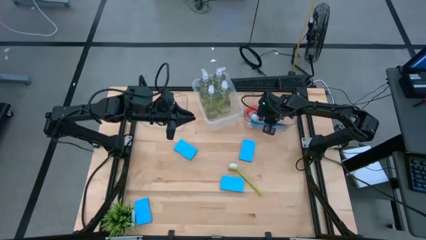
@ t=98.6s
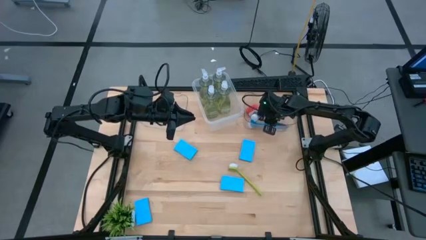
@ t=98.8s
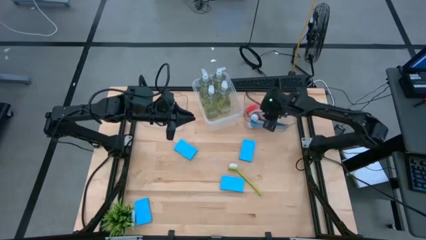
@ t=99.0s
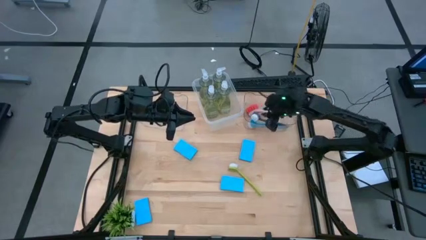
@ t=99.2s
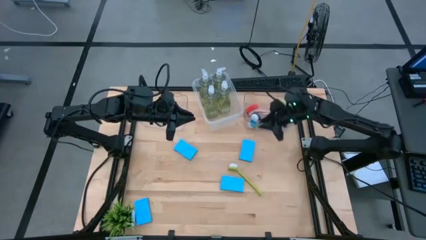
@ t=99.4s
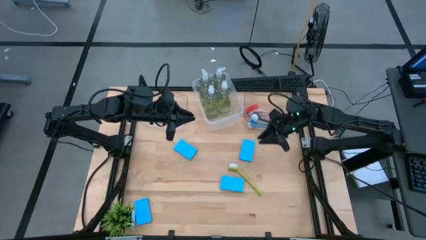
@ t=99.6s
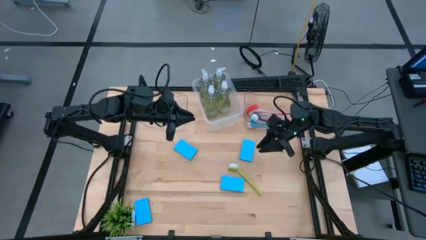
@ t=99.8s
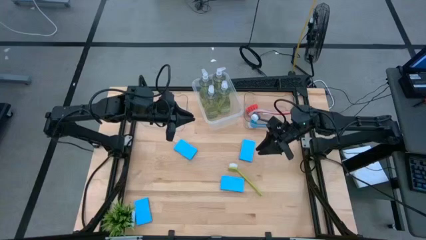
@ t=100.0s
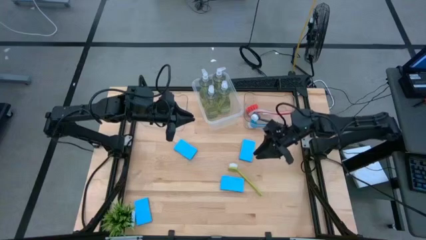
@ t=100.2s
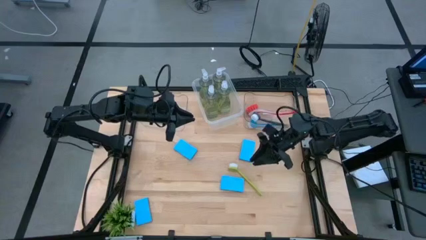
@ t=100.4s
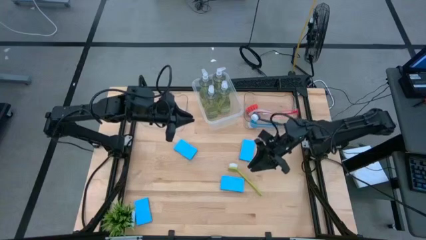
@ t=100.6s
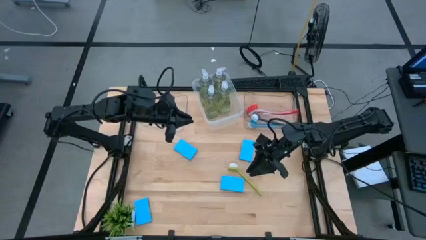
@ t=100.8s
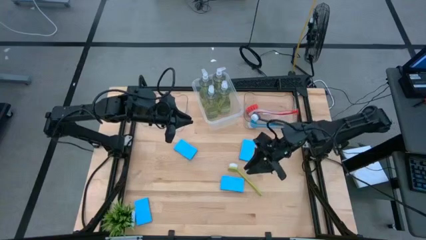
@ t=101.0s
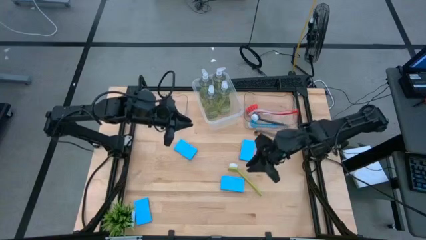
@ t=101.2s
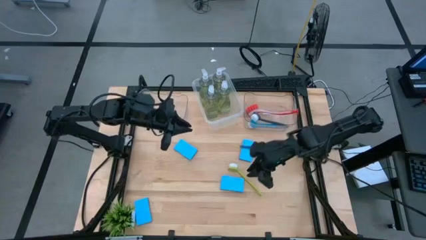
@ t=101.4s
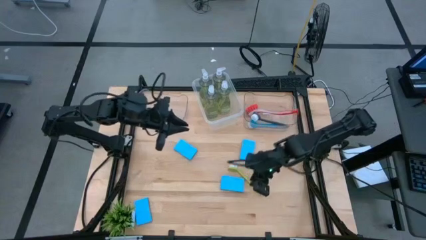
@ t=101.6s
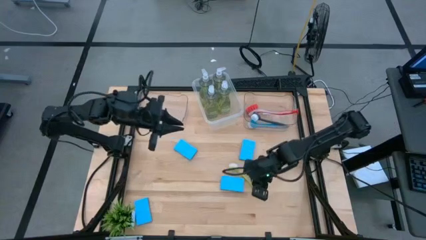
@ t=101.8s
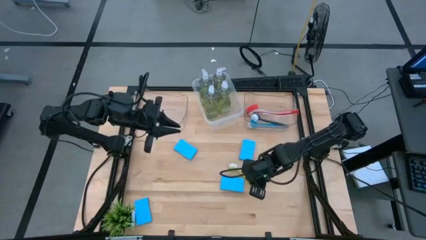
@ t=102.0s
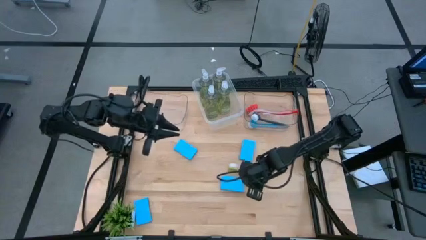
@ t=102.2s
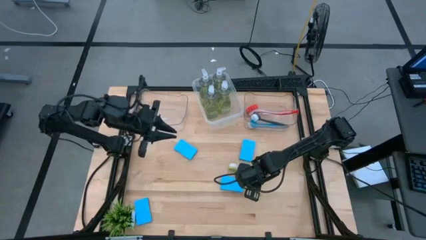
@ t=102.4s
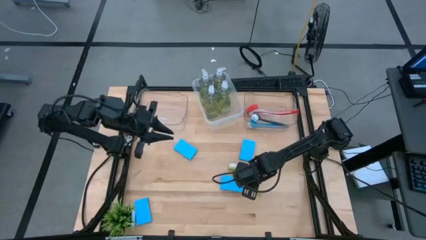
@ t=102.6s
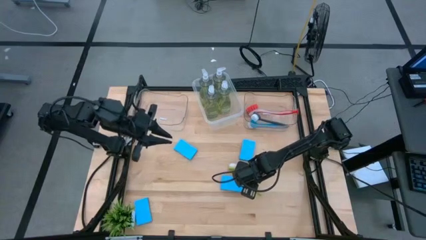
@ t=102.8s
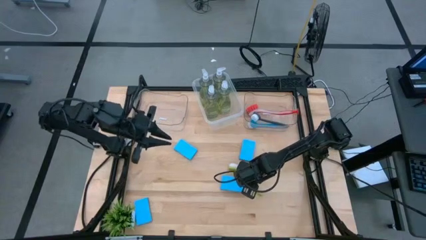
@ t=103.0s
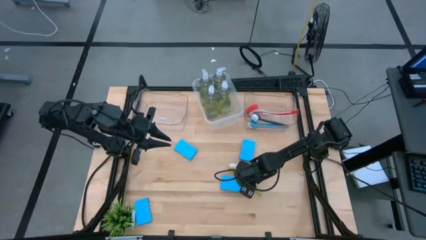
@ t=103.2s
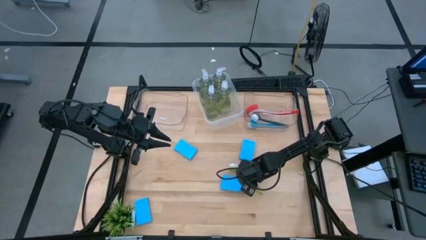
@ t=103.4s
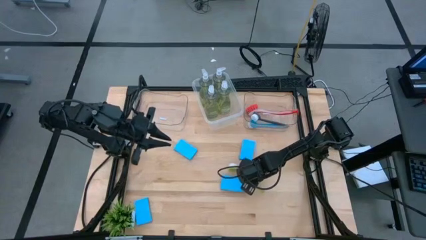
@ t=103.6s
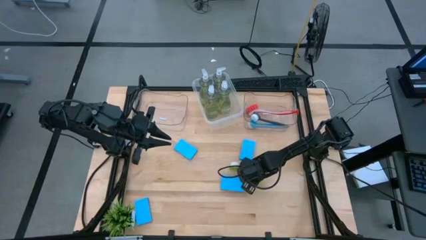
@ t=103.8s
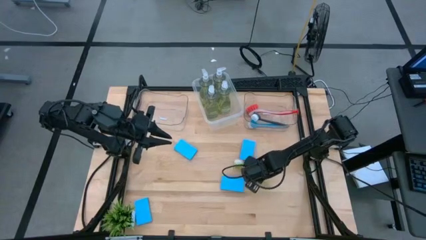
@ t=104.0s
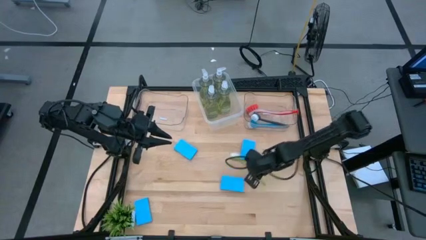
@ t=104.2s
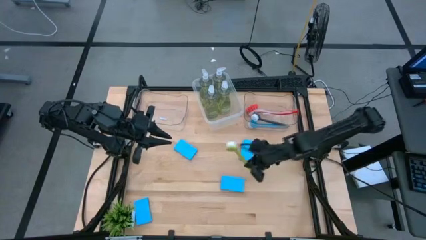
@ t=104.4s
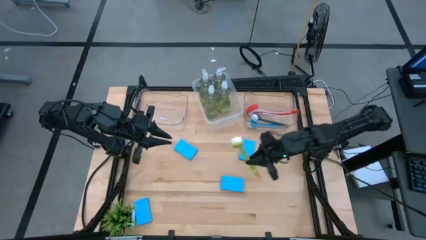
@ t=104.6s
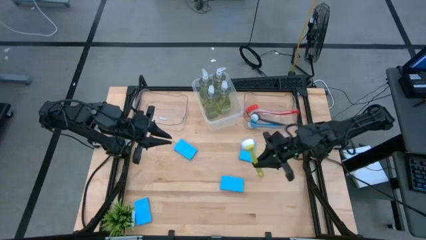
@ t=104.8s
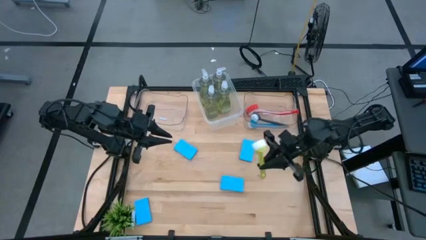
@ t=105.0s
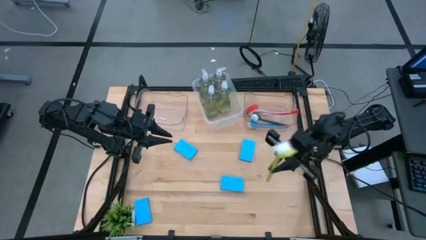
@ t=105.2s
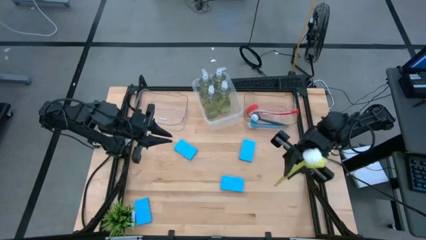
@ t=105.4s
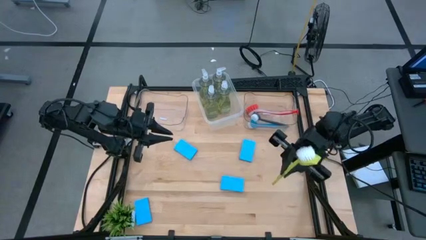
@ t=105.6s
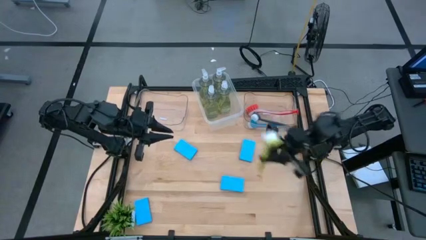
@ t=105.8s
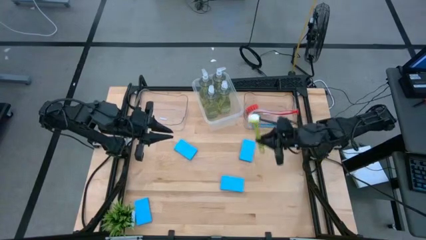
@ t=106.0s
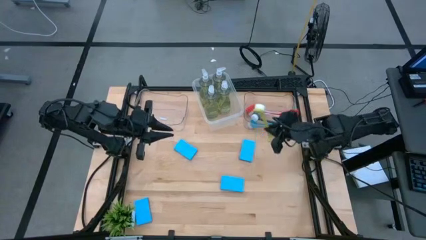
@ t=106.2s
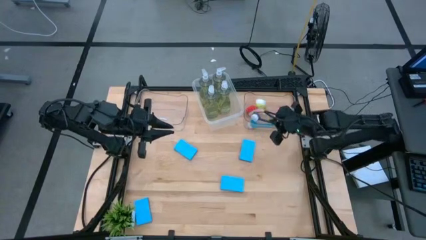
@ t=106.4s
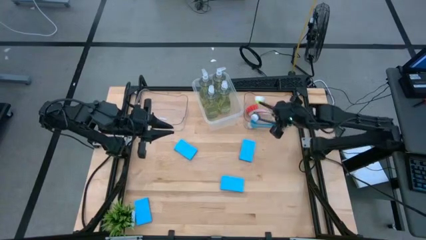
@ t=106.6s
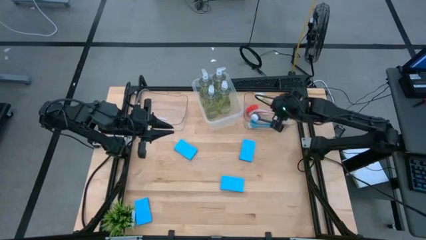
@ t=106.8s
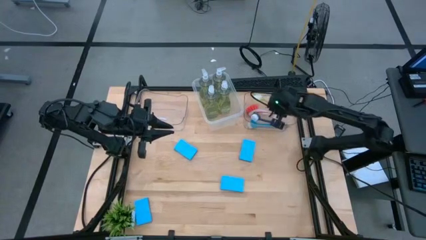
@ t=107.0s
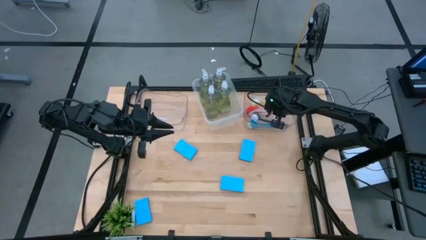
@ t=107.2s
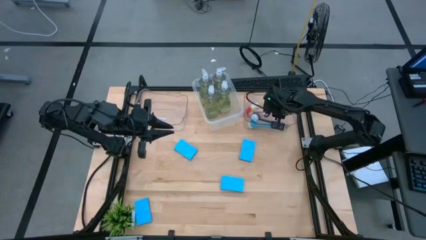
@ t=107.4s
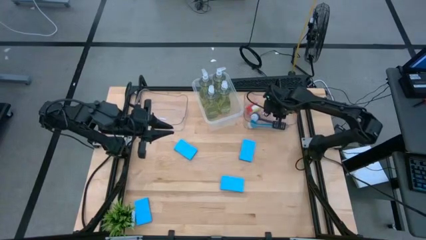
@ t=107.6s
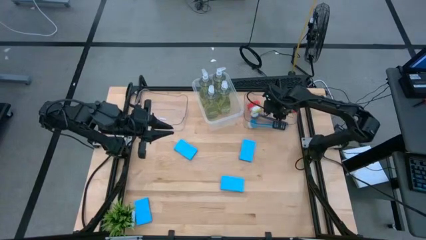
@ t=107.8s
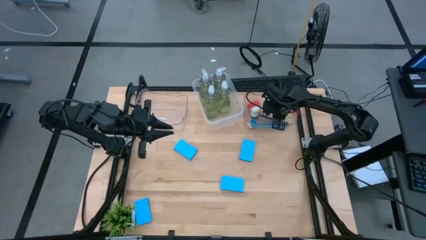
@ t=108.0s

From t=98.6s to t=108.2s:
Task: Pick & Place Kitchen Sink Supplies
Put the green dish brush into the right transparent bin

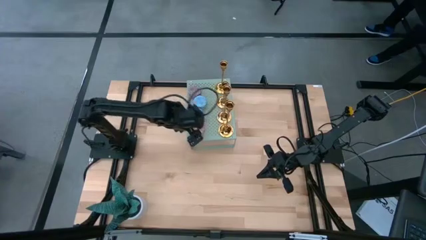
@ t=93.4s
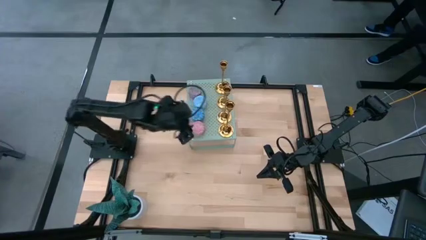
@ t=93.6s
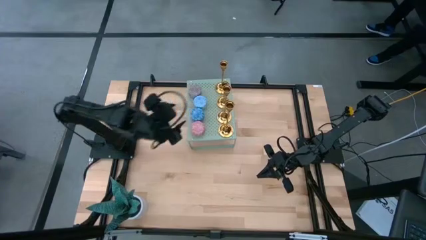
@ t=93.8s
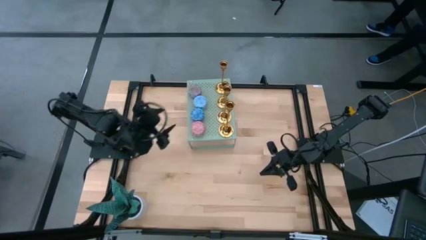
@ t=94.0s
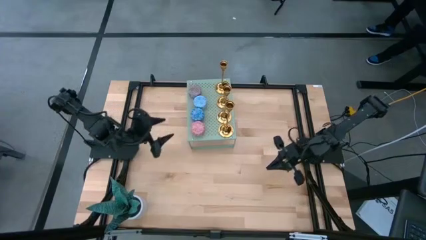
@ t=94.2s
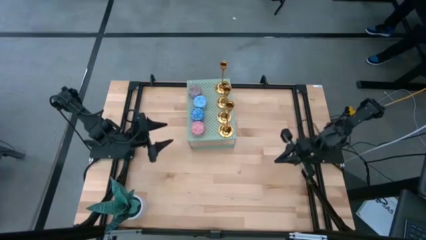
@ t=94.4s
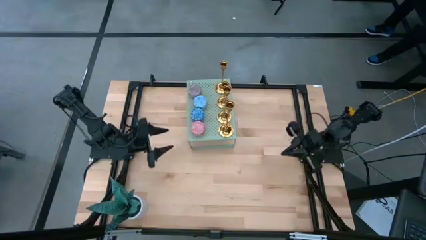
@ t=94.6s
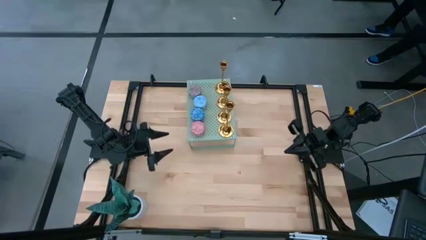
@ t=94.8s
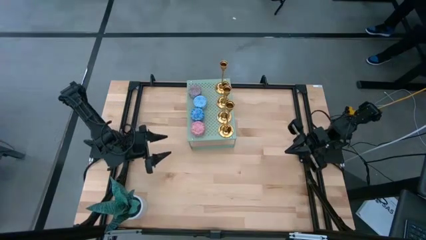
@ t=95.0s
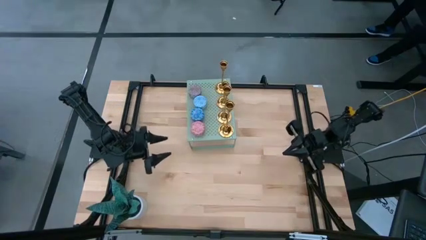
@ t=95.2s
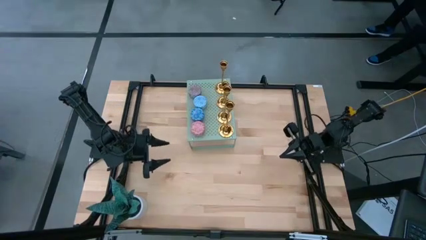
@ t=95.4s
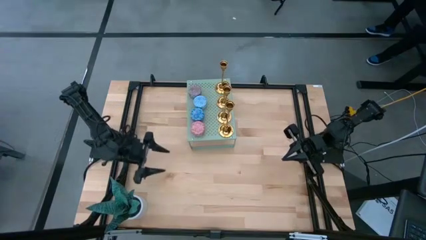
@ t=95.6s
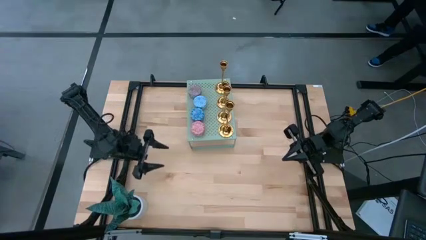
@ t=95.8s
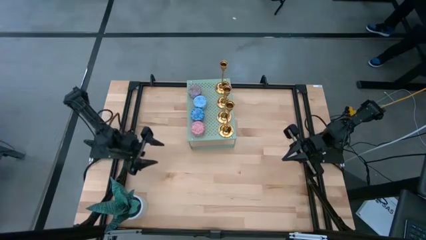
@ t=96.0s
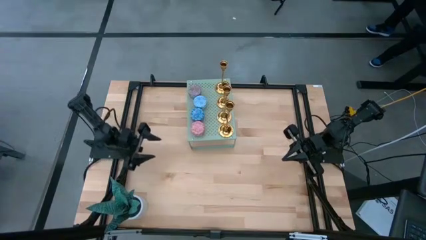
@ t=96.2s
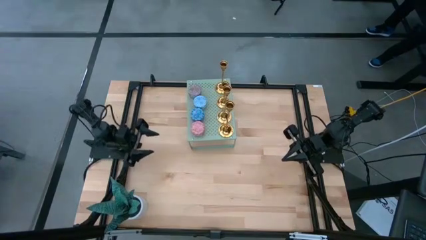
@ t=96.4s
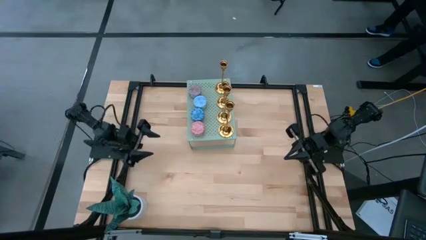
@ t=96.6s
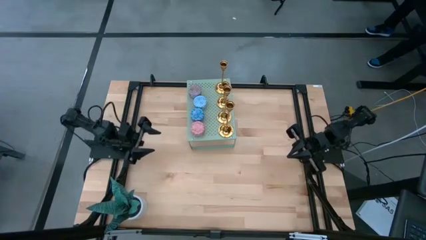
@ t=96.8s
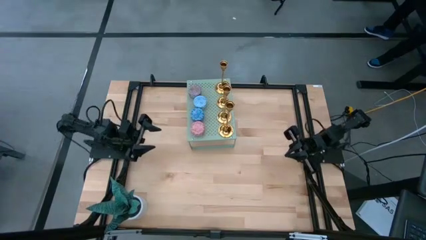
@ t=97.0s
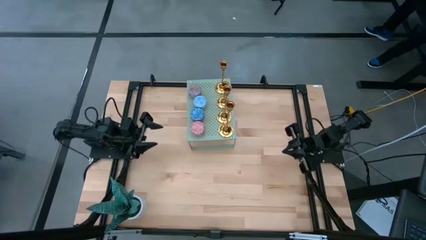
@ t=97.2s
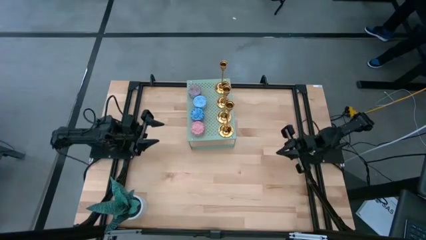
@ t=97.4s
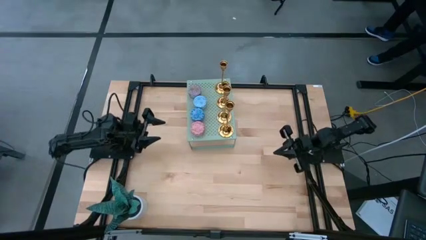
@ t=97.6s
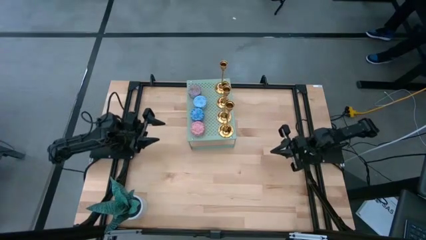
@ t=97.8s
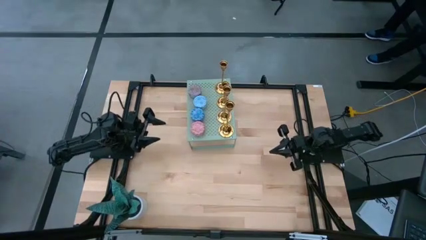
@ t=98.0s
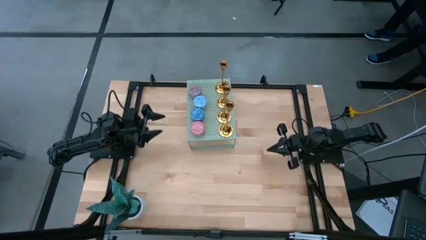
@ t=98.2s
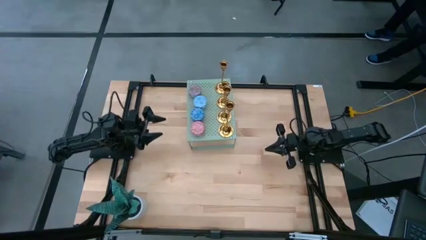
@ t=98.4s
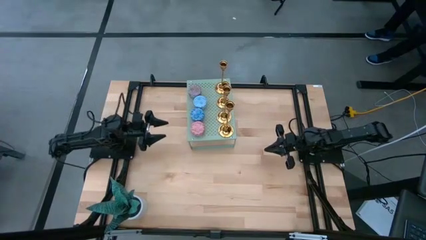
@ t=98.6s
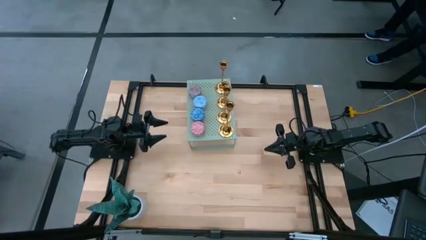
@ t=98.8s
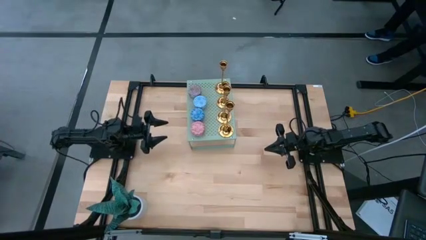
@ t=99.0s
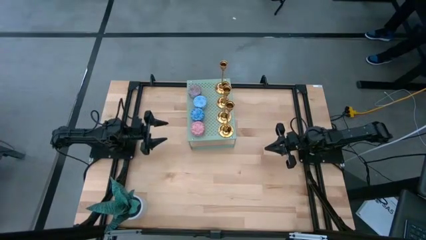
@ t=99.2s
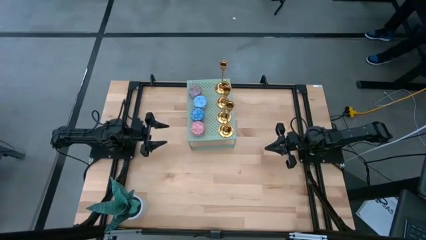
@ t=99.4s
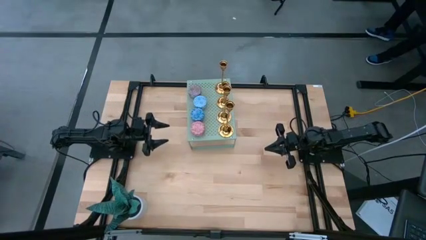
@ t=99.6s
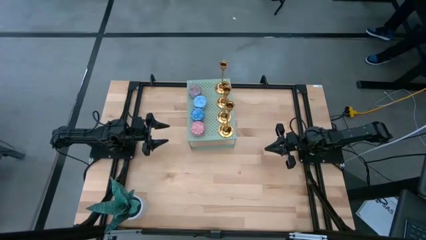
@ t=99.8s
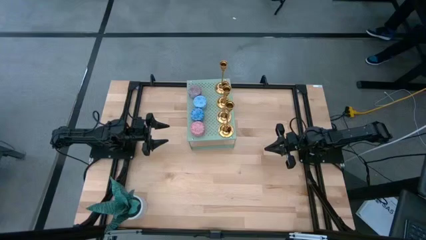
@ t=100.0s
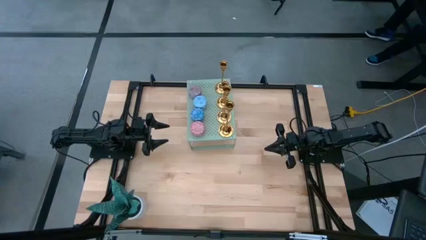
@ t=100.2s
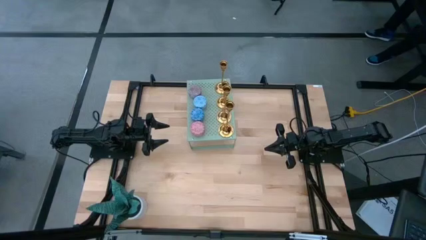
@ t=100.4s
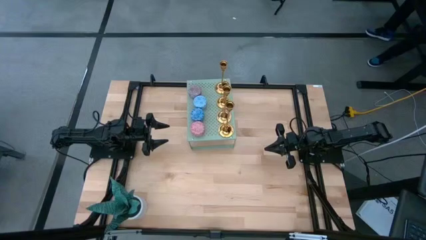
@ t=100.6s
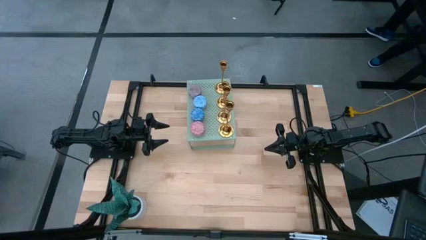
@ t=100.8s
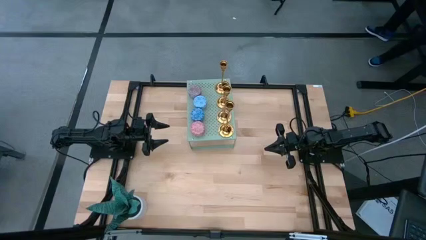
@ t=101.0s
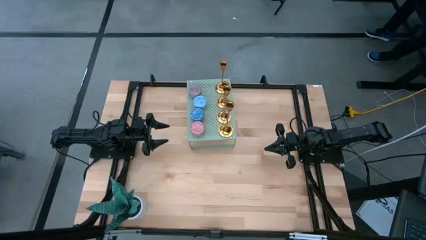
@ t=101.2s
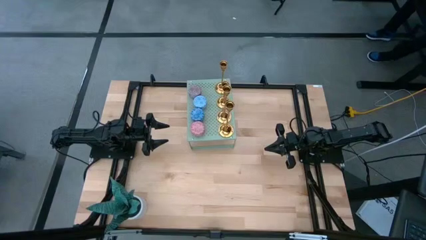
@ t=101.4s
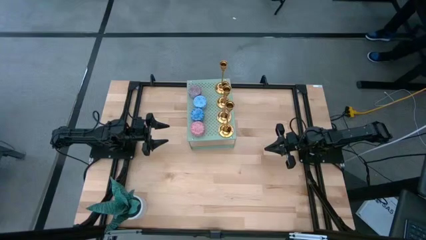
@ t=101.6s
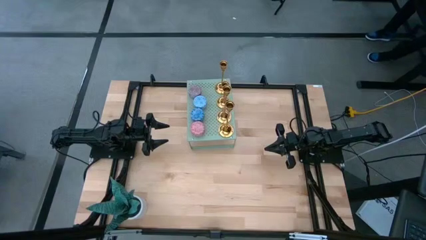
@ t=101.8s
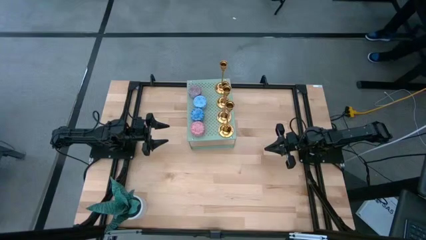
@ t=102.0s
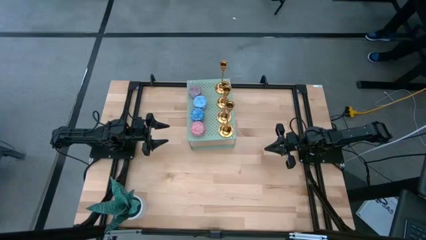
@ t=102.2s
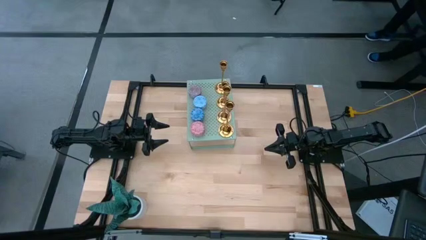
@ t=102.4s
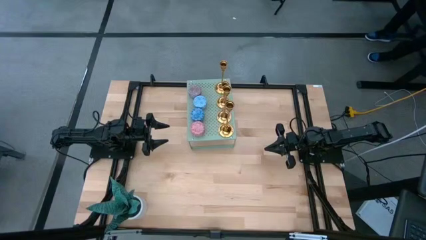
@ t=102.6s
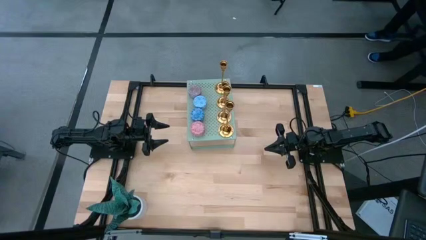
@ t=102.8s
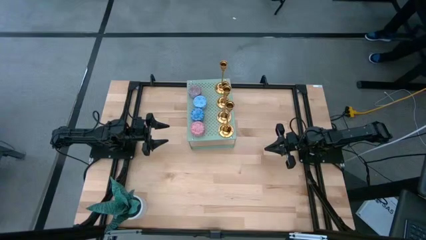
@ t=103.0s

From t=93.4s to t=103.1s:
Task: Pick & Place candle stick holders
Return to Home Position
